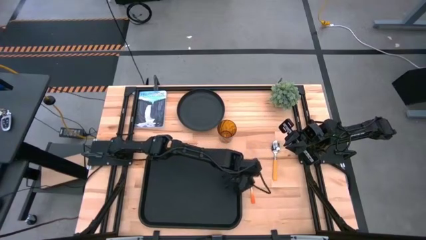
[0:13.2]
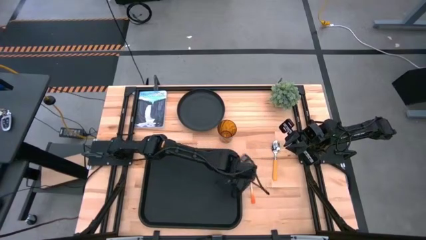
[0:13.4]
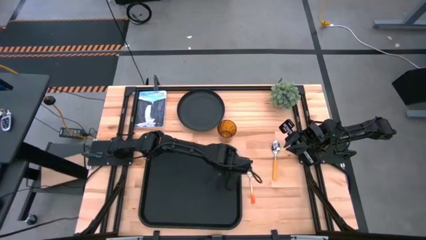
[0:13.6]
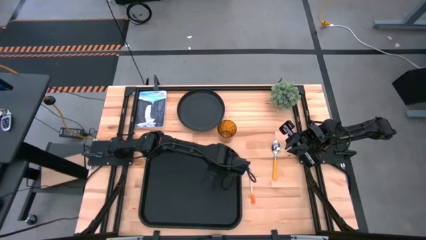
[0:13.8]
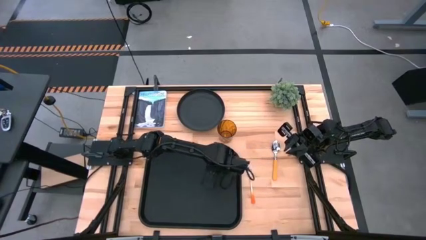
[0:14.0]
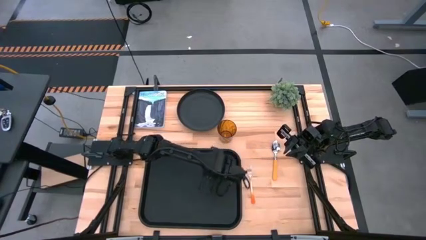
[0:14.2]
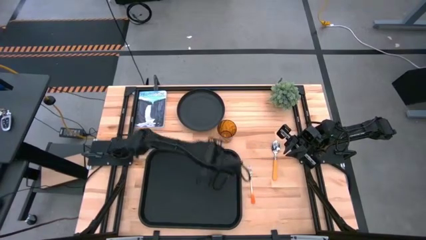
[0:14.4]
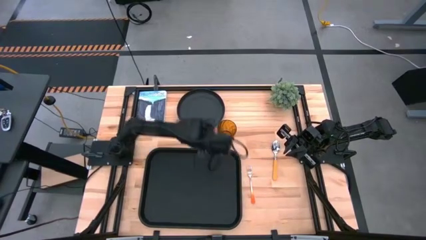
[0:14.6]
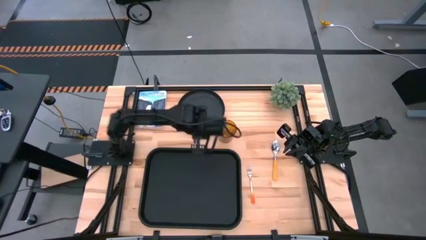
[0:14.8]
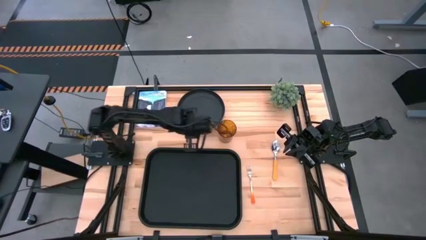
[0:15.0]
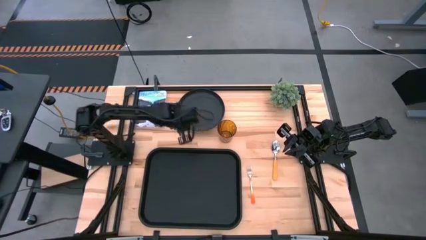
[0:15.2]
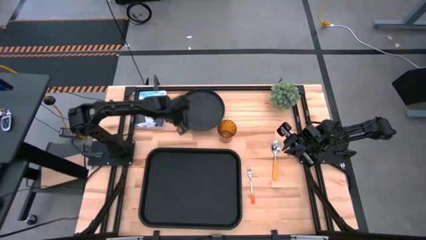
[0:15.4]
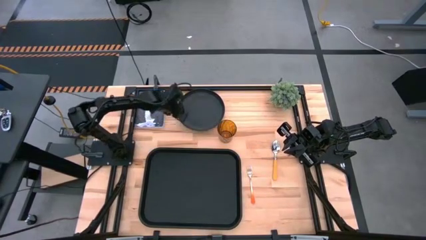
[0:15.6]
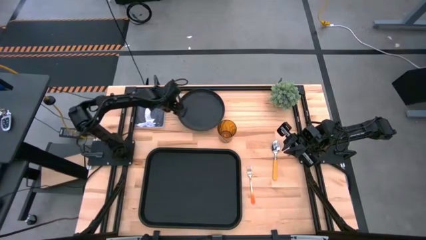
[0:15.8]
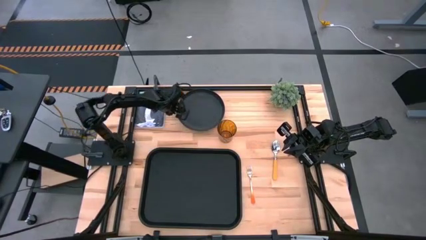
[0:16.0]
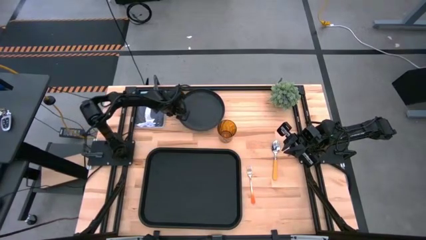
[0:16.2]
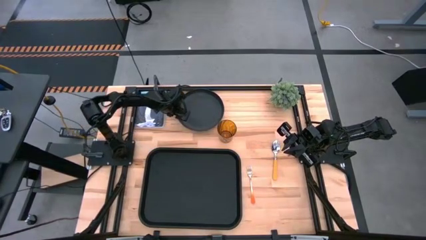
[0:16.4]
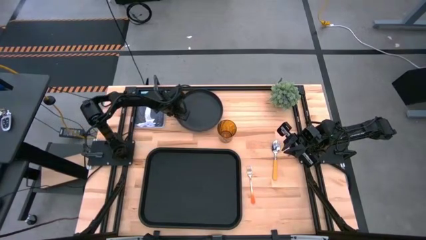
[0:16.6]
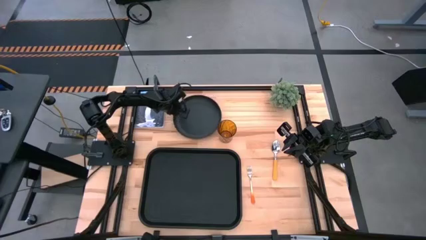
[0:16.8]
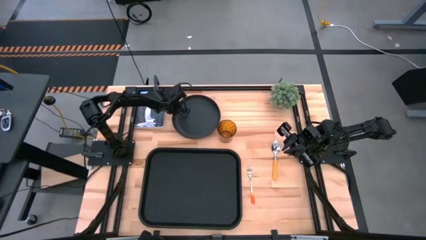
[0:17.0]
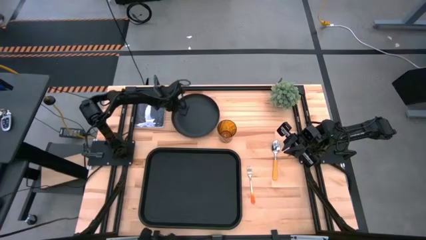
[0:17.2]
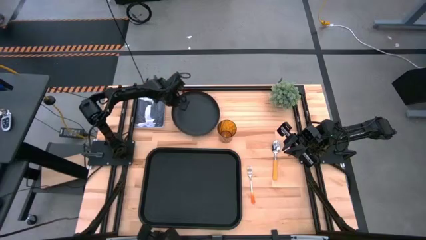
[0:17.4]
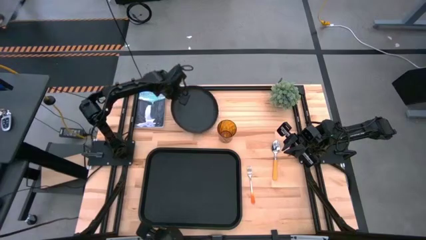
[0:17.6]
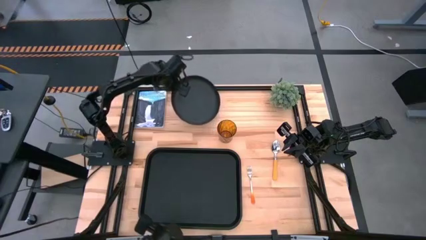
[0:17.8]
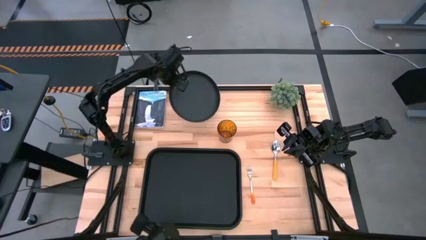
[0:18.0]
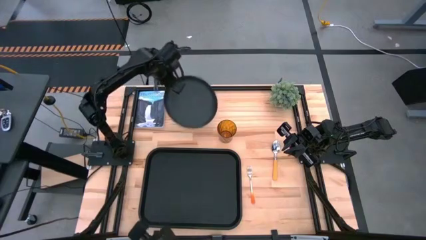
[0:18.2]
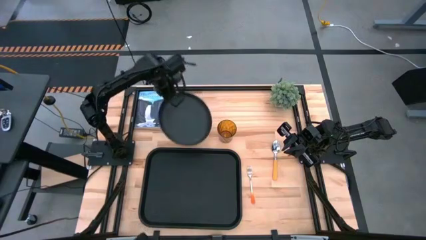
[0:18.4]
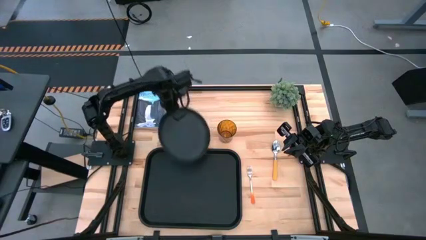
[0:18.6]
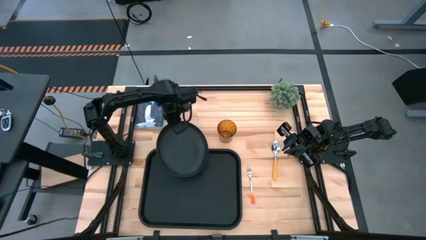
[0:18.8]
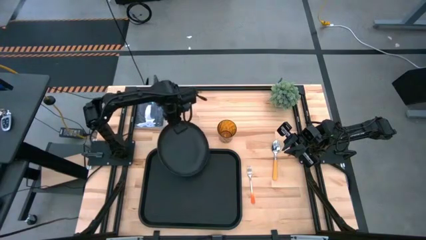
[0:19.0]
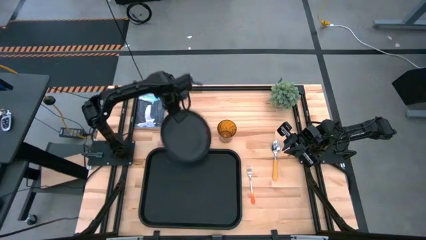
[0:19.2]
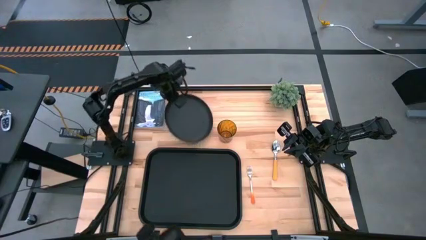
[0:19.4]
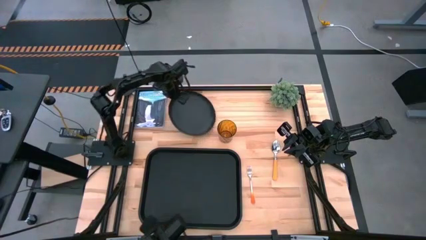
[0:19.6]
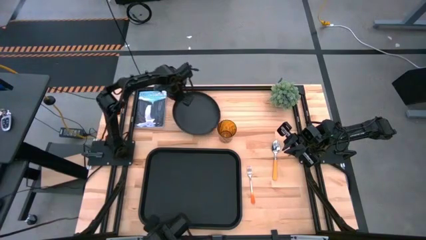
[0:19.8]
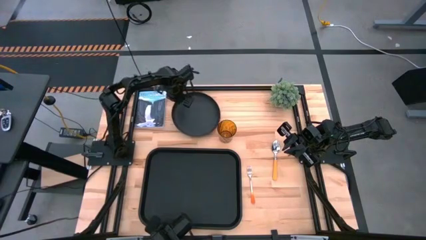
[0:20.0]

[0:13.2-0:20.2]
Task: Pick and place plate/cup/fork/spoon on tray
Put the black plate on the black tray

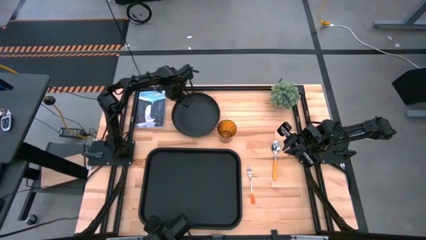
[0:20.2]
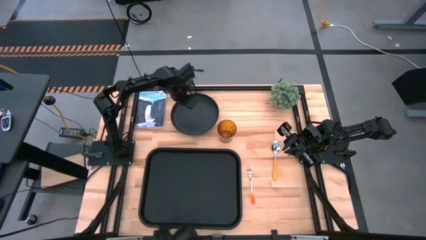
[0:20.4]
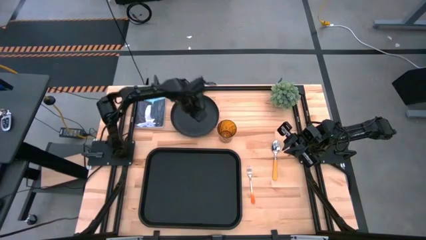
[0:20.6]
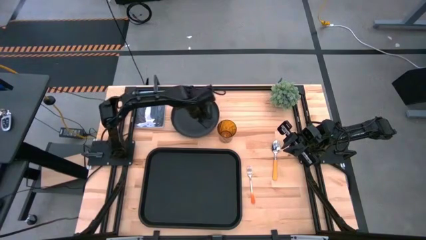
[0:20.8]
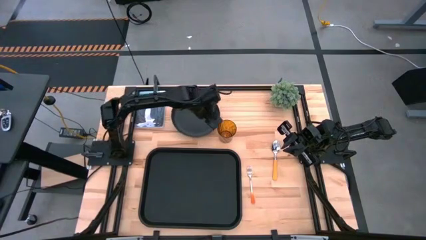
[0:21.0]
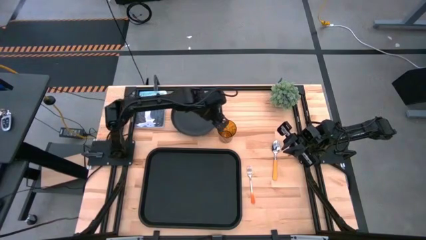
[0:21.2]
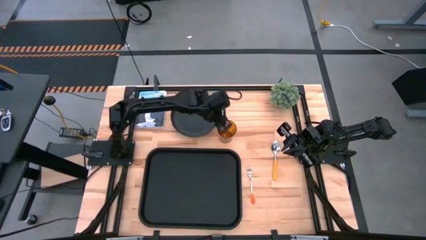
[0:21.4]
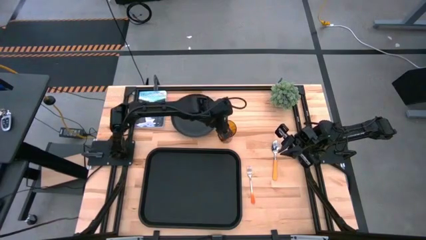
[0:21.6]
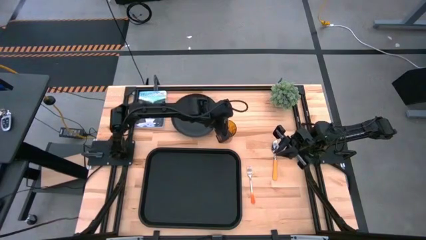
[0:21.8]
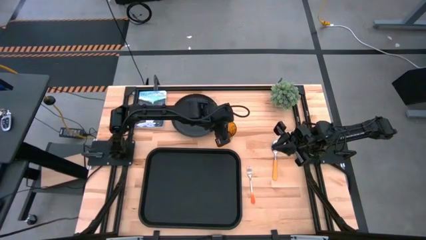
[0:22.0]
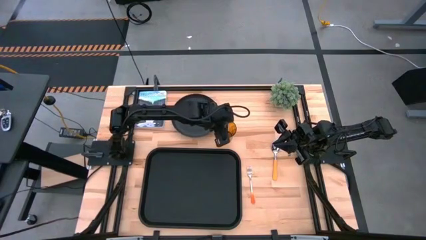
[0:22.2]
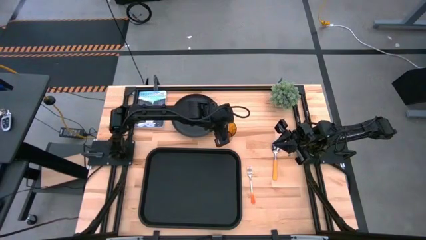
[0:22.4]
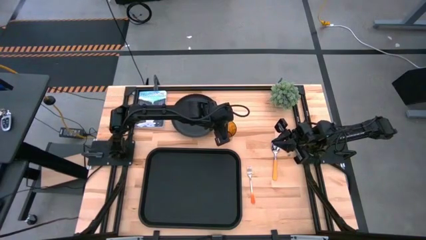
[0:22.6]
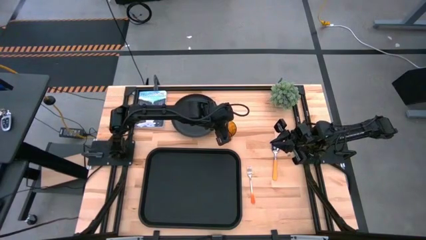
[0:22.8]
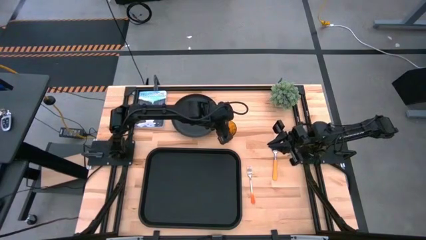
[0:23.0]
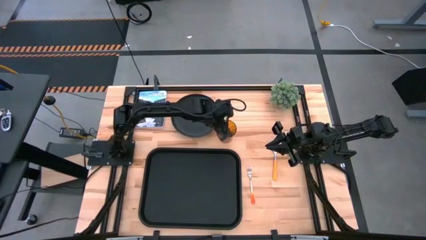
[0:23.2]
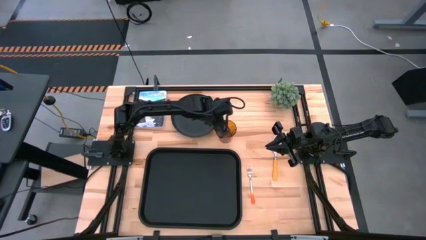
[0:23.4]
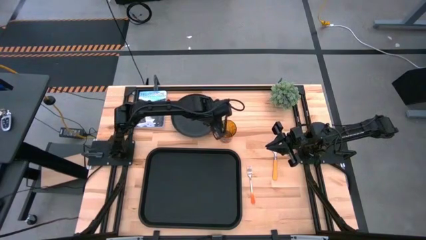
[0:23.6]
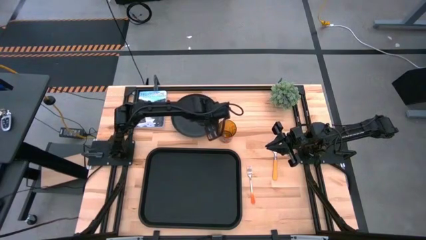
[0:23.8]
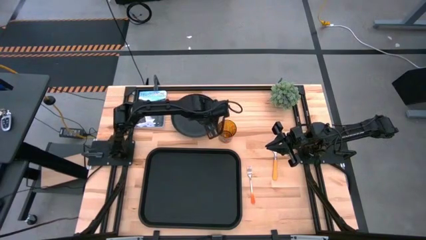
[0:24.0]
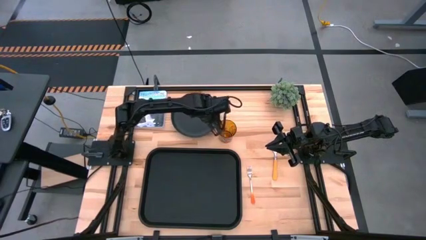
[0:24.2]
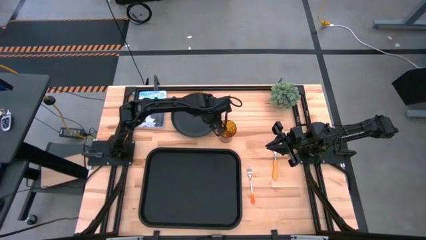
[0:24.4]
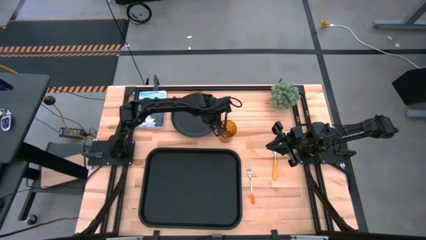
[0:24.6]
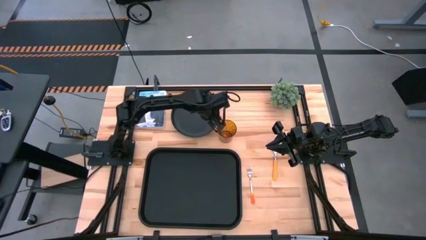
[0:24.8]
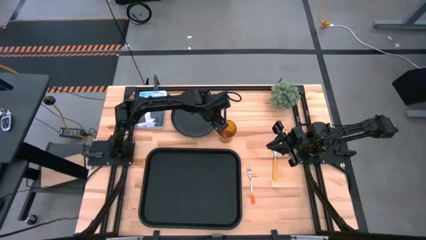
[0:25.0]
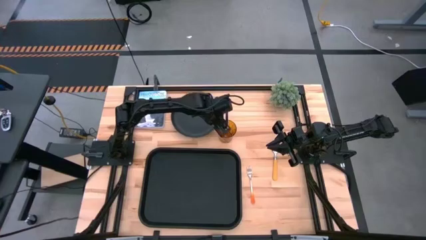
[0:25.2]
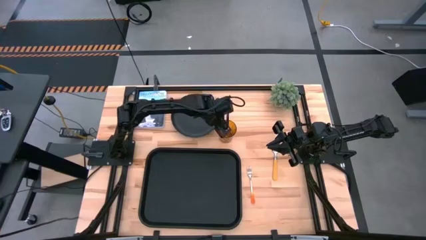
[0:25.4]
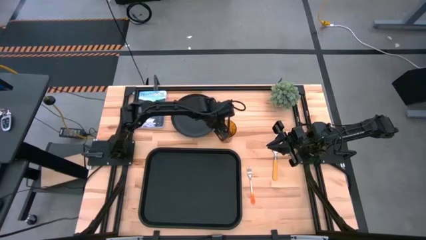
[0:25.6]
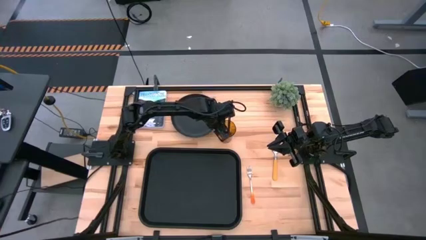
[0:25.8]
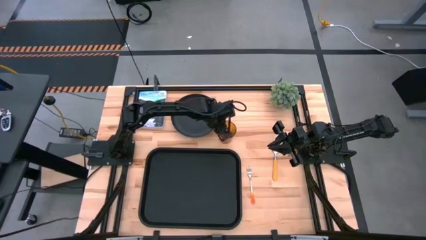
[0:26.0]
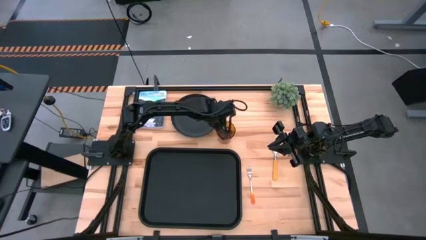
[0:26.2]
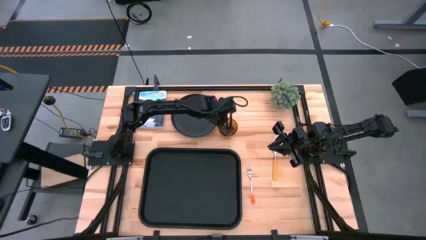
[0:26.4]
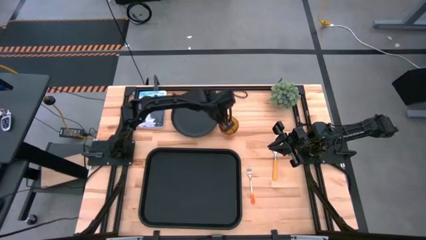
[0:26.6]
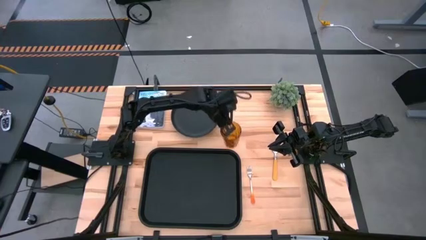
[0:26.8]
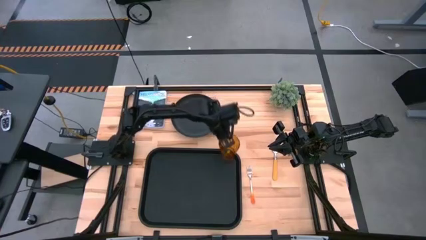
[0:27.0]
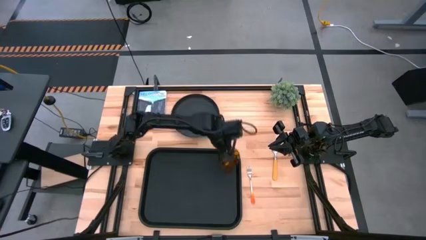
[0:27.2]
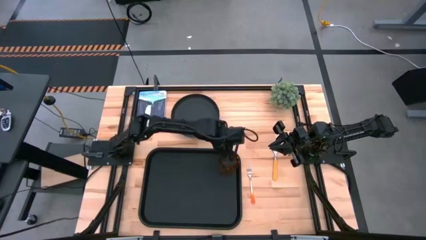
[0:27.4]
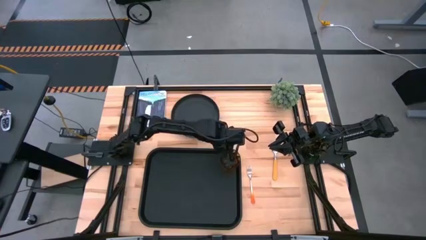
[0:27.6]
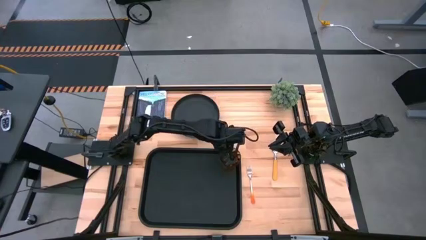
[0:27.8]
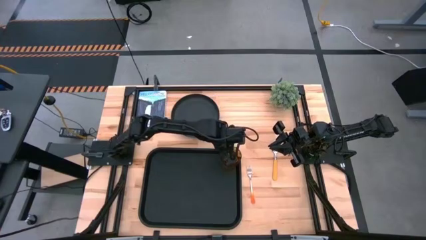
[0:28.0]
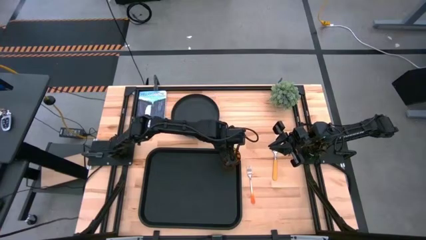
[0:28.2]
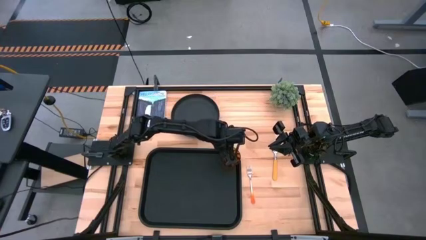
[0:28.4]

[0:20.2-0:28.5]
Put the orange glass on the top right of the black tray
